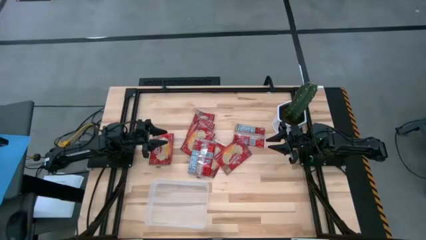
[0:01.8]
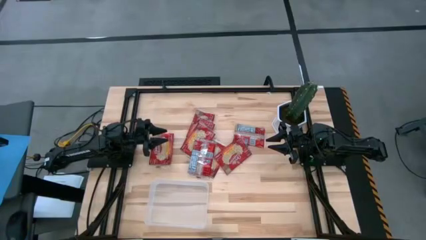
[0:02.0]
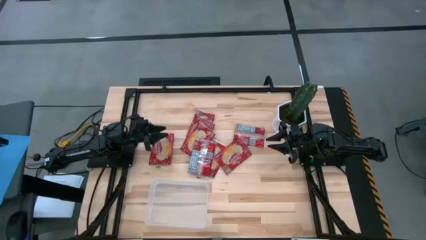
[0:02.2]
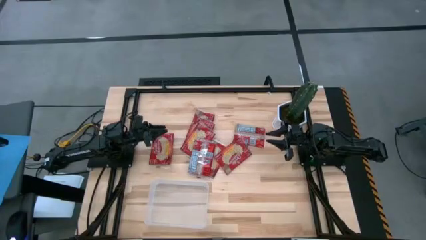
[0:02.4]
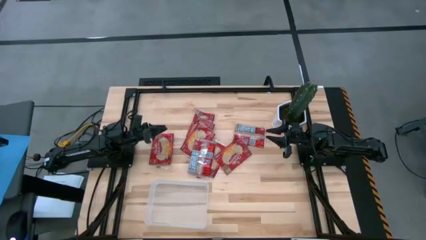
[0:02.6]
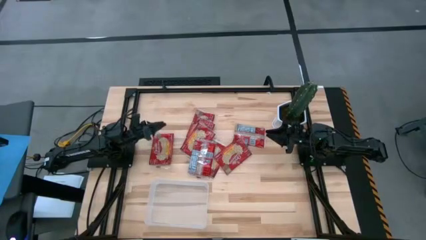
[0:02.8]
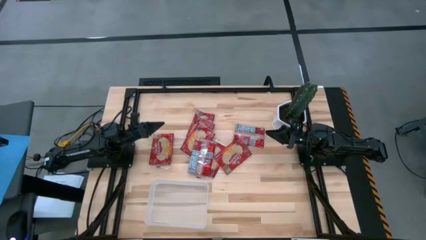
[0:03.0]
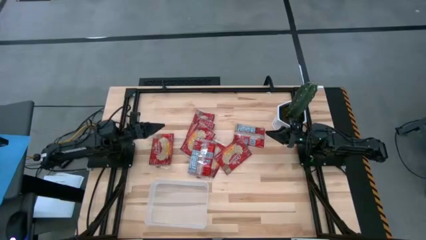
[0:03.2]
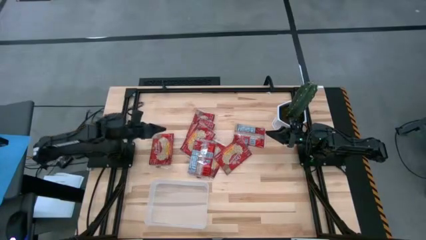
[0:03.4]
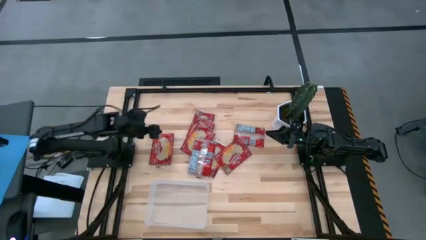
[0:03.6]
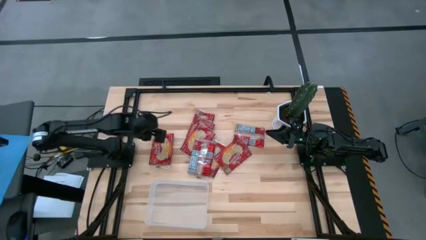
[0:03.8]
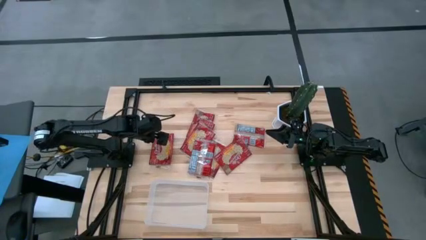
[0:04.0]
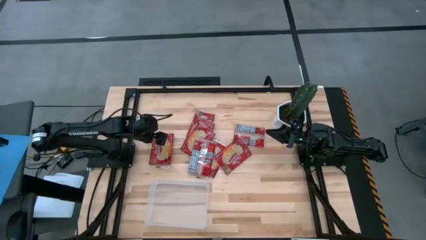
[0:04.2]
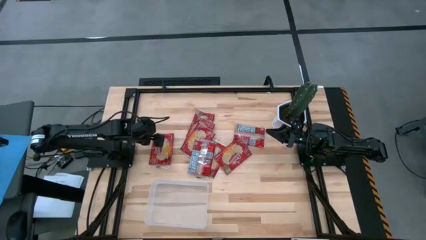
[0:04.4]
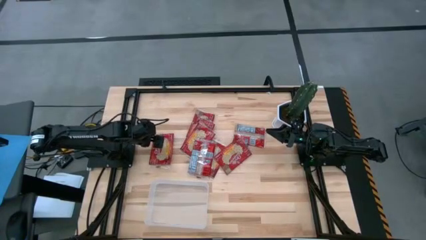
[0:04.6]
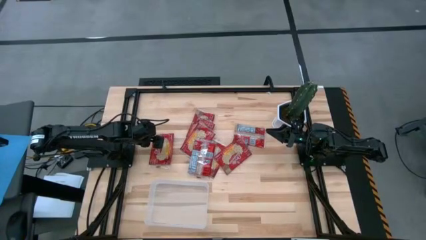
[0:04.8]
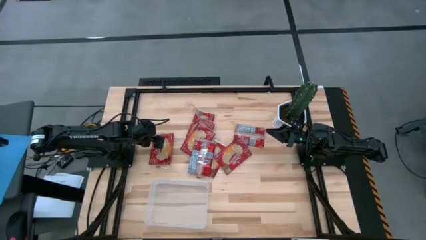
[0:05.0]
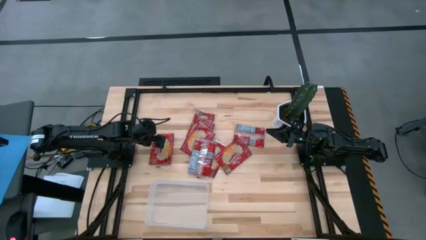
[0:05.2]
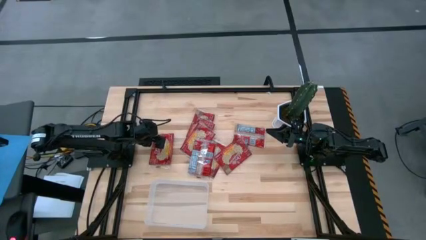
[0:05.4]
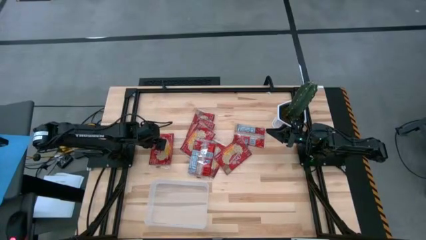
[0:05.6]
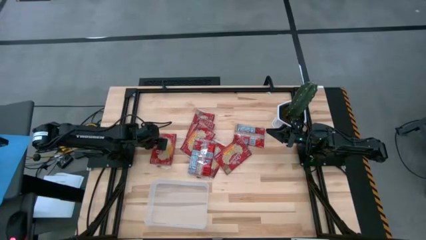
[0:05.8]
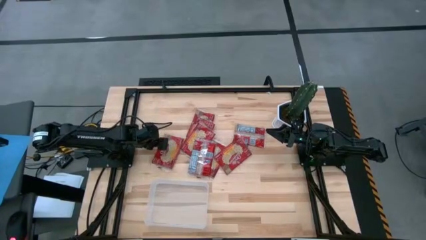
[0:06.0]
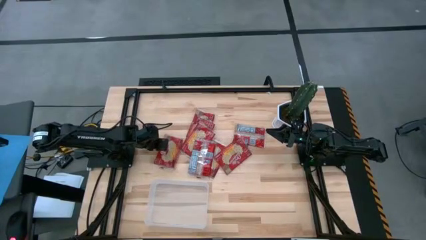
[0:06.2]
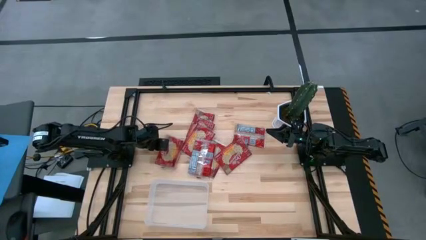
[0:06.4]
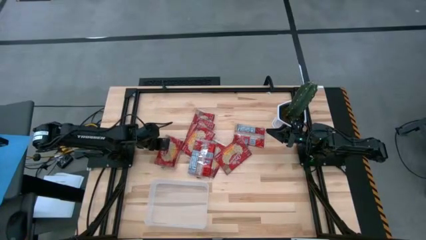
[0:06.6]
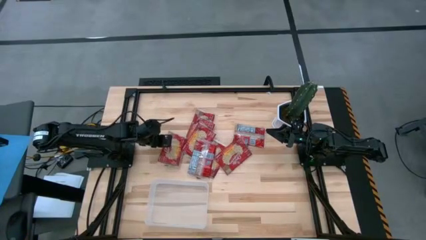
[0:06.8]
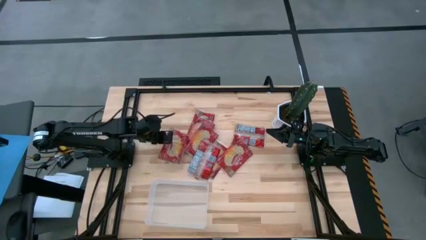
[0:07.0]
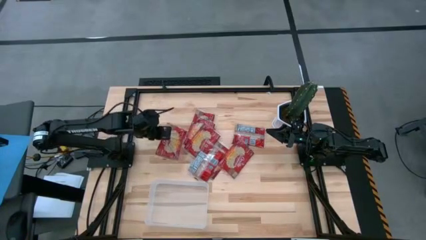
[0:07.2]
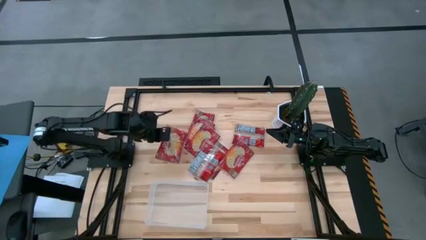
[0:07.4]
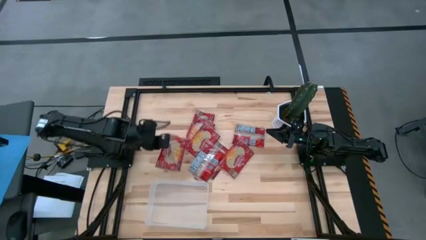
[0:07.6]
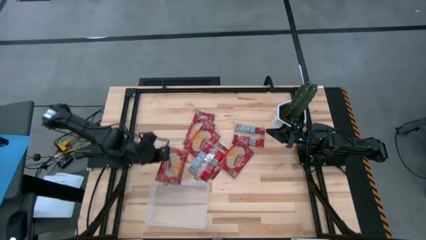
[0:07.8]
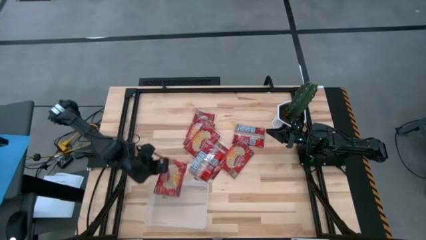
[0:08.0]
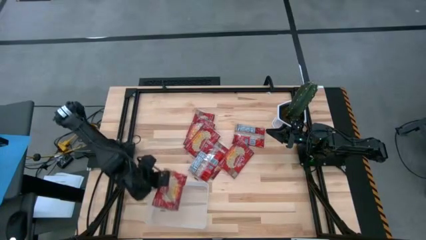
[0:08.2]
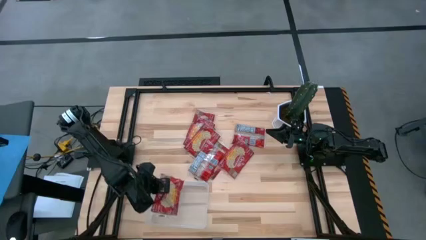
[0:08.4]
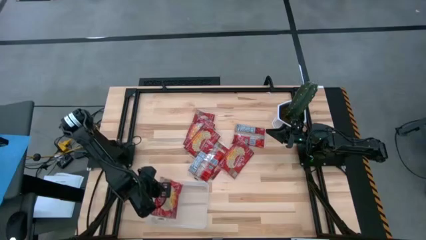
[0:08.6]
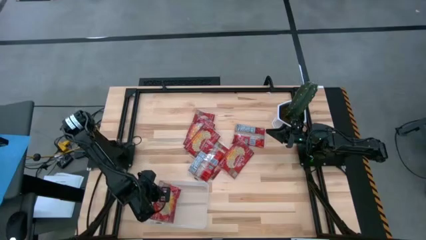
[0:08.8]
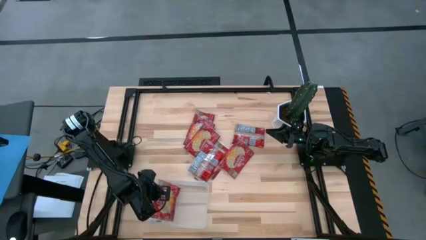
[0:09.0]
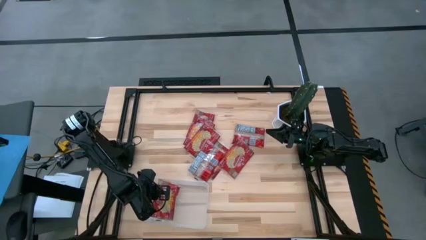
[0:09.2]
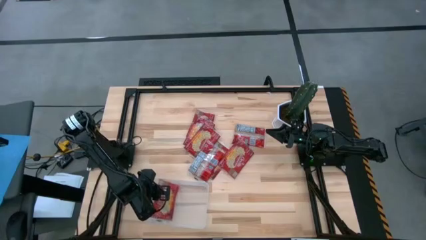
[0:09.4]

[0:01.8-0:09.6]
Task: Sort popcorn bags into baskets
Put the popcorn bag into the transparent bin

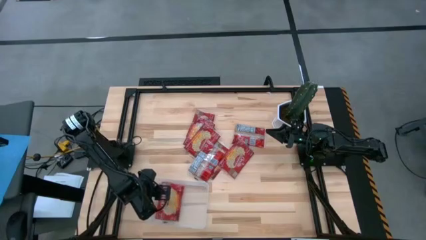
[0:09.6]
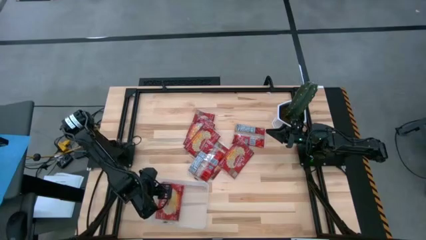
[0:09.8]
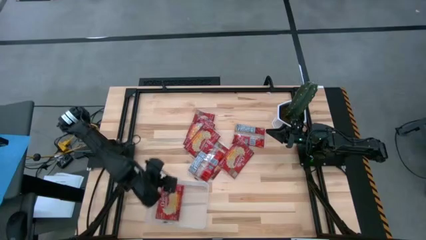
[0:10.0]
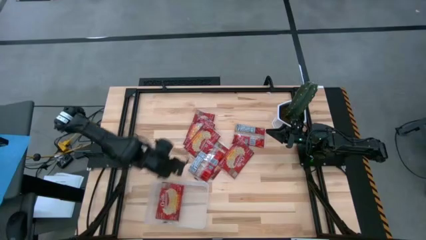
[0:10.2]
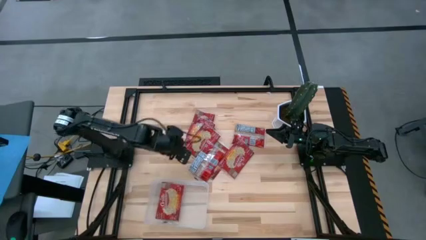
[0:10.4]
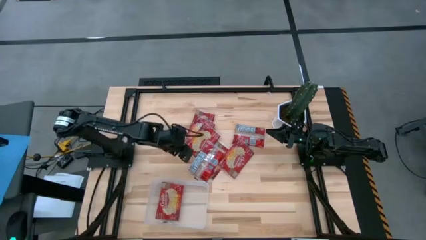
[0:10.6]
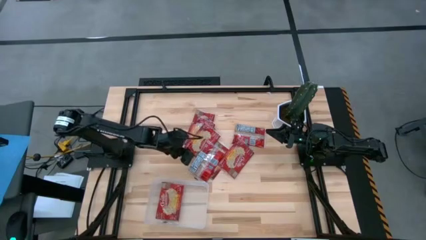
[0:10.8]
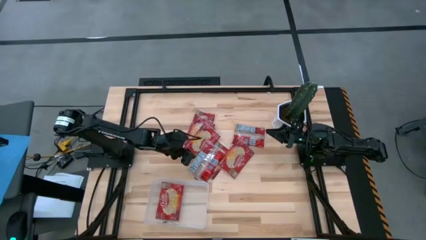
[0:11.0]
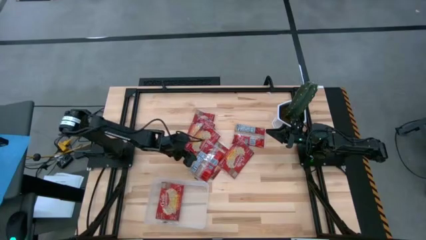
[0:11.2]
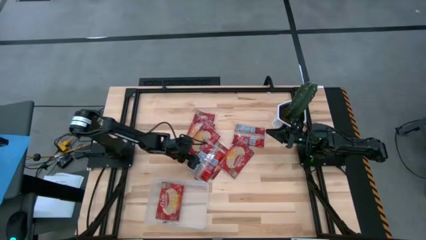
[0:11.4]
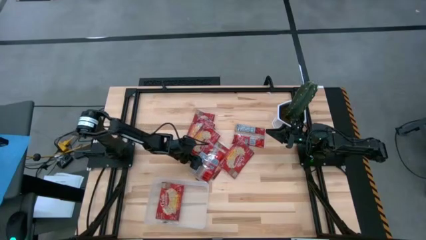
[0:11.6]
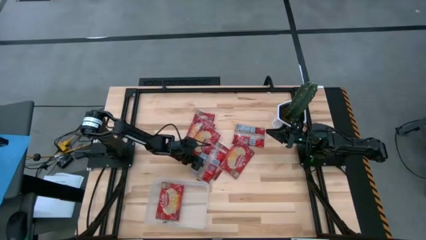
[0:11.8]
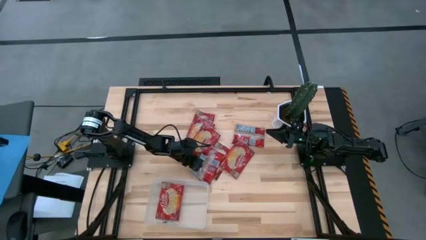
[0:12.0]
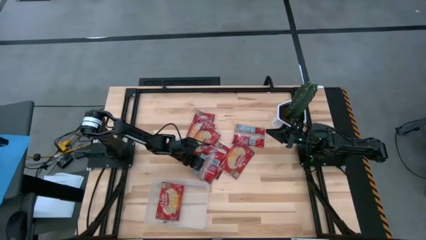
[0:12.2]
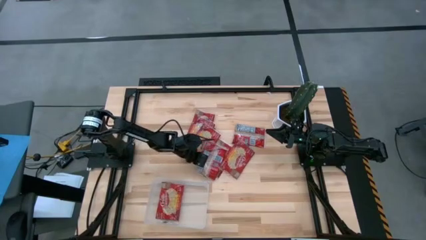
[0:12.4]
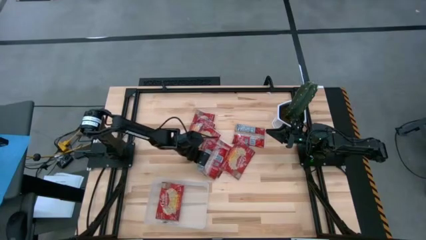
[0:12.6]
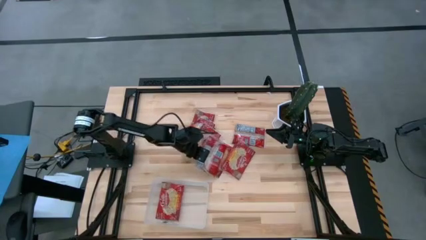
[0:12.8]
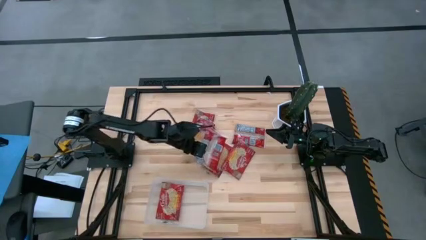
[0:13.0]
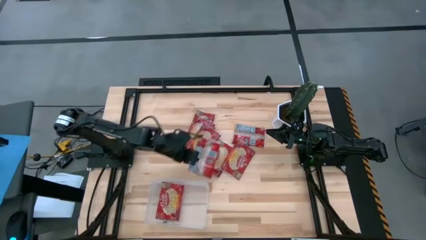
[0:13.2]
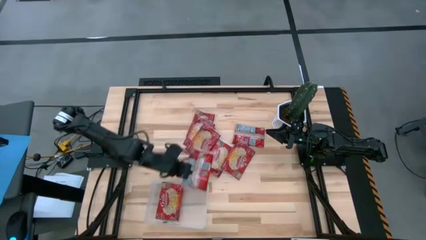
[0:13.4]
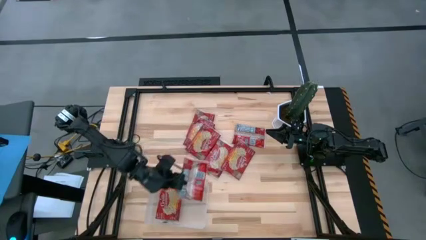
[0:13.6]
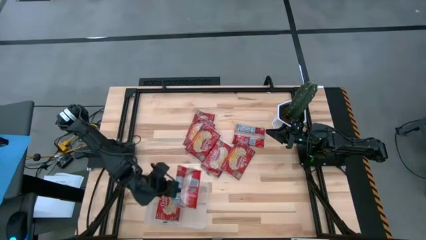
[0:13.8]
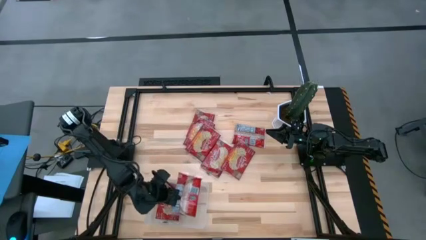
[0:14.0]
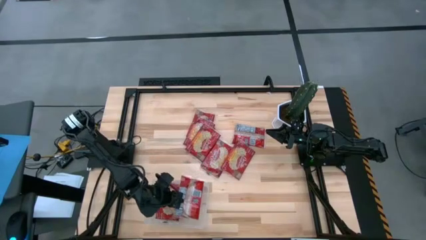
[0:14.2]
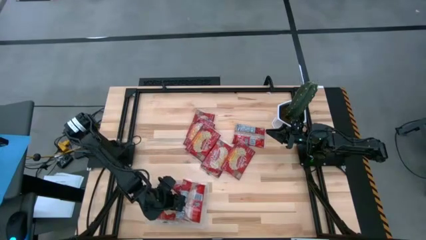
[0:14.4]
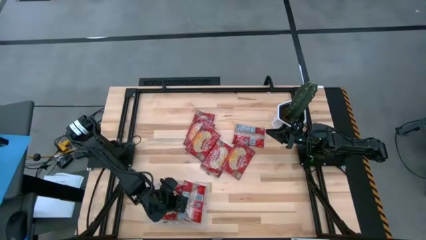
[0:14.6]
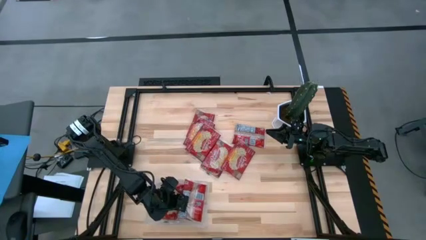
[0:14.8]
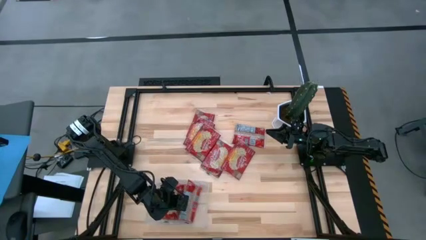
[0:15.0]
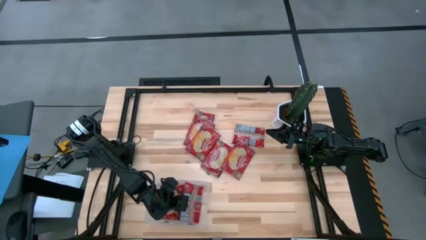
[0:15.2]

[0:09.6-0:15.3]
Put the popcorn bag into the transparent bin

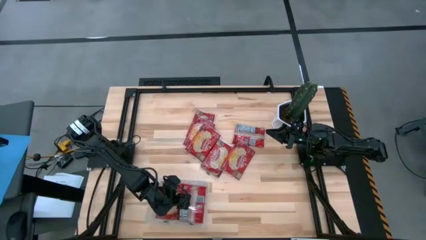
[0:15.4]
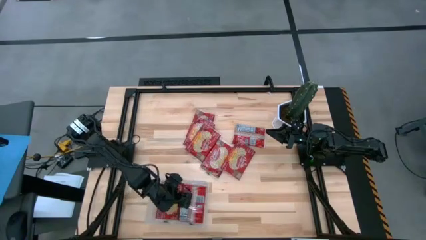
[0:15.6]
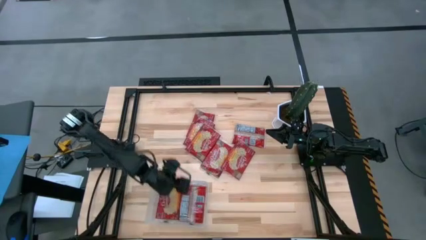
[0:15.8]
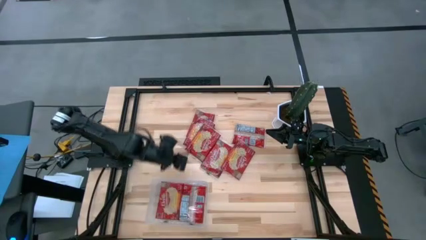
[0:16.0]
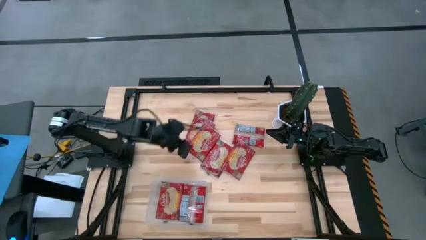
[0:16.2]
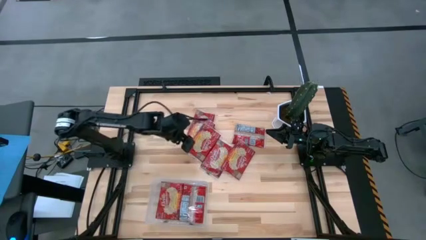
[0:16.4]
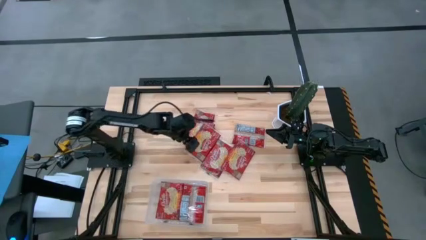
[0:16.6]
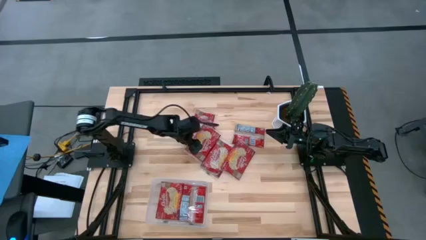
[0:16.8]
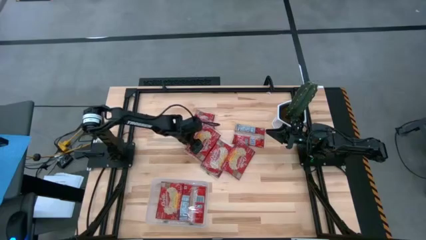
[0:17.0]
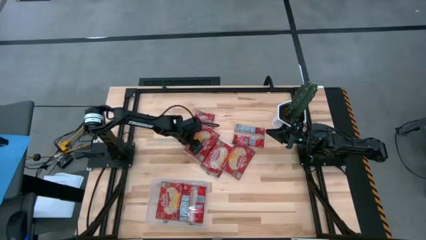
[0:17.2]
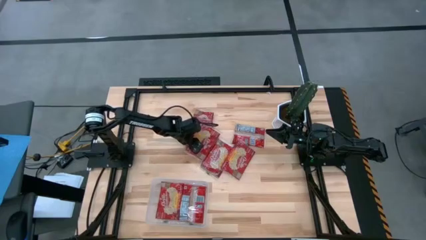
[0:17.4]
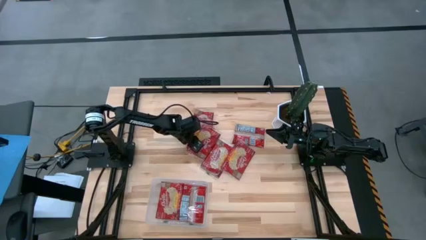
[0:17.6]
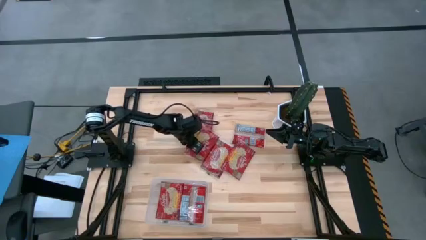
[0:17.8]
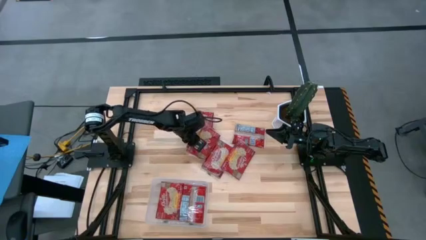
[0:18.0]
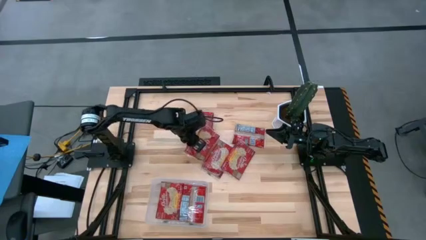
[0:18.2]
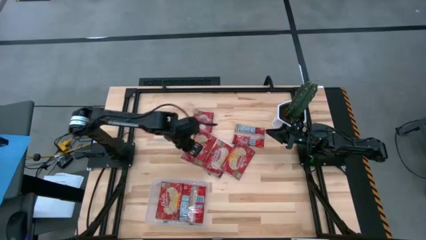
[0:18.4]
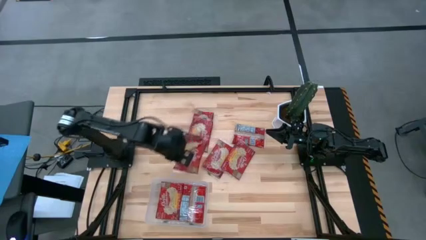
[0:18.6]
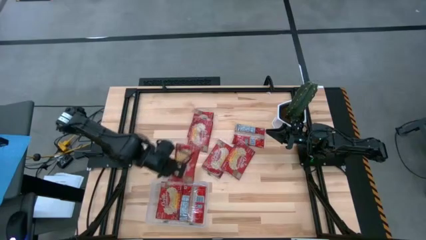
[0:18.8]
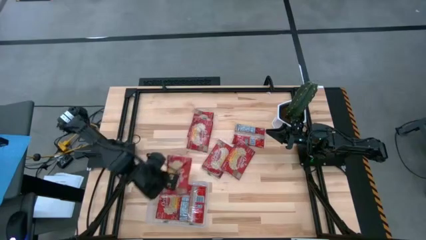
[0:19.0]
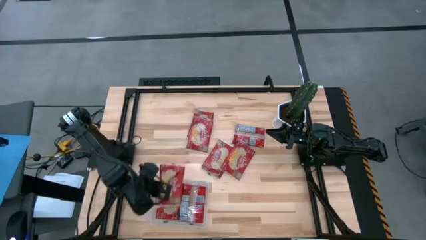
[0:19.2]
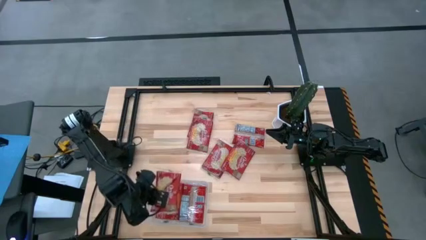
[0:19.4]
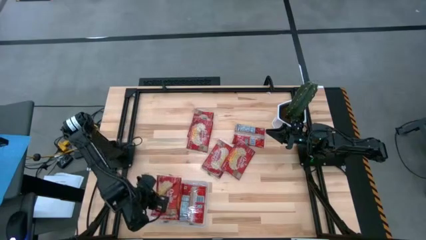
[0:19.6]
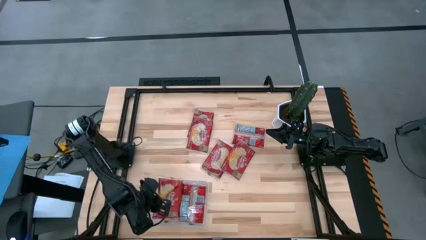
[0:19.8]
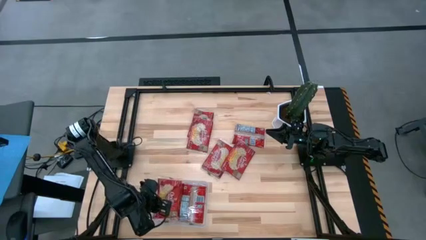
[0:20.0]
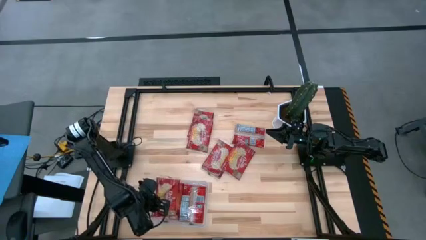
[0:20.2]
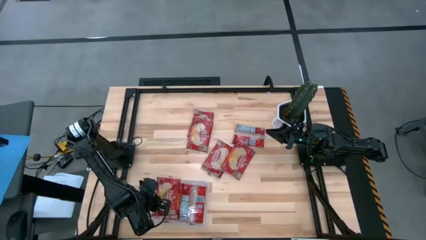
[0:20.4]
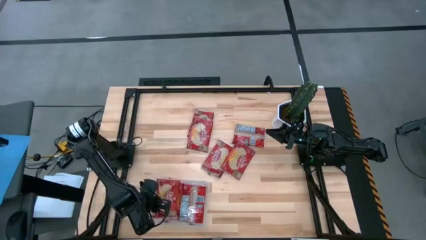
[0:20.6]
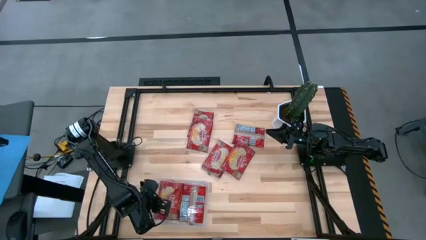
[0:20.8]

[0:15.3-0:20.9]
Put the popcorn bag into the transparent bin
